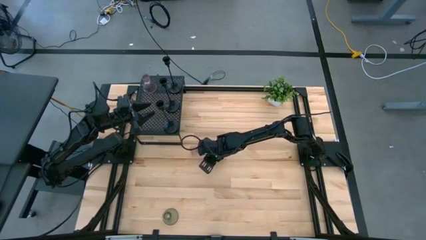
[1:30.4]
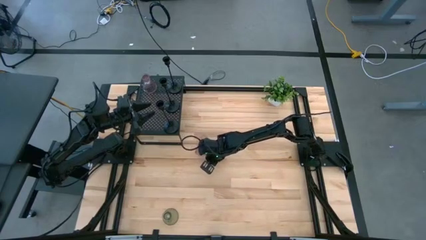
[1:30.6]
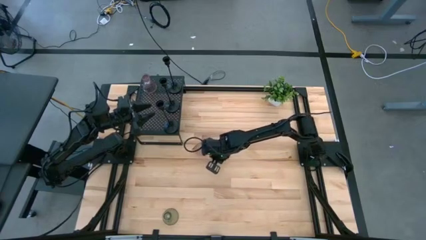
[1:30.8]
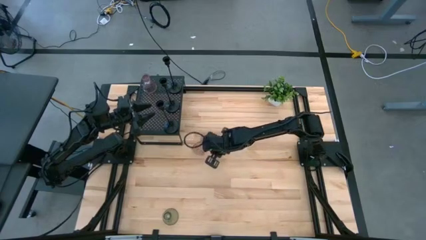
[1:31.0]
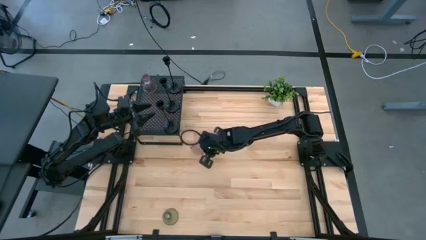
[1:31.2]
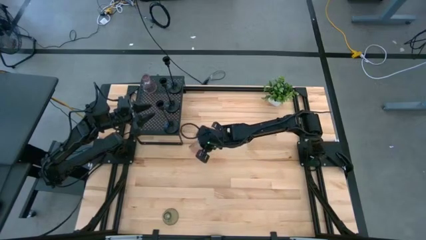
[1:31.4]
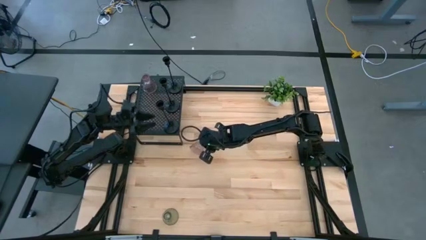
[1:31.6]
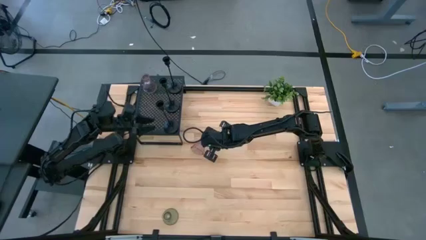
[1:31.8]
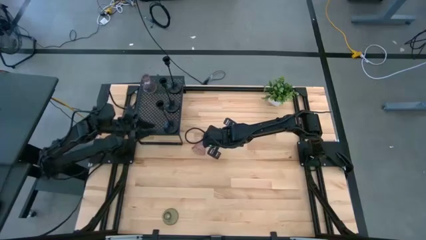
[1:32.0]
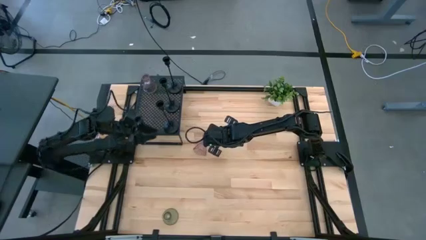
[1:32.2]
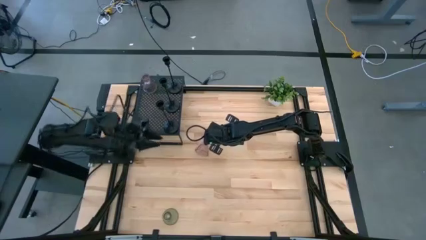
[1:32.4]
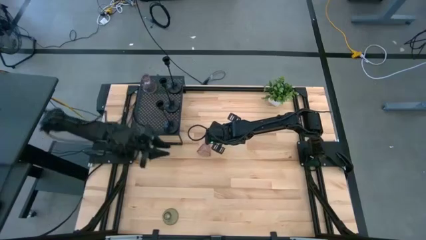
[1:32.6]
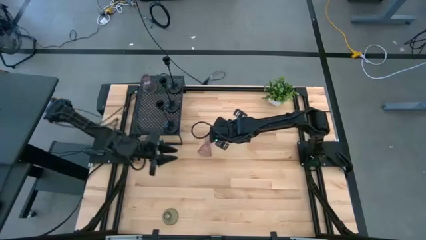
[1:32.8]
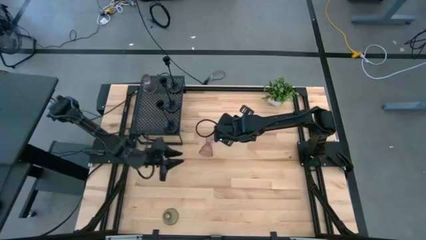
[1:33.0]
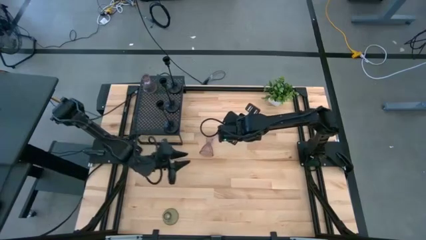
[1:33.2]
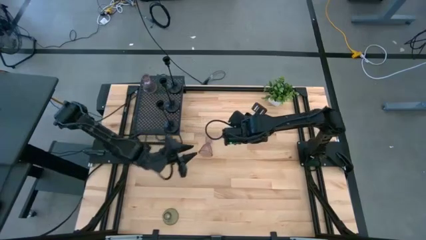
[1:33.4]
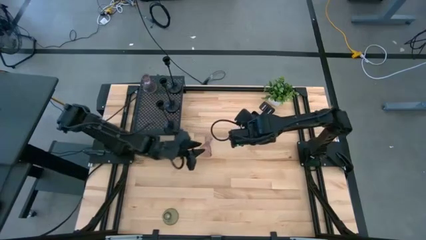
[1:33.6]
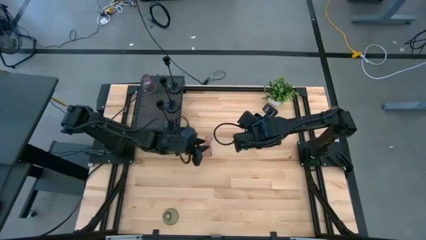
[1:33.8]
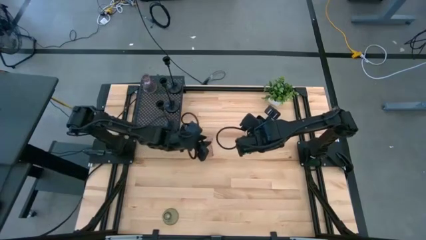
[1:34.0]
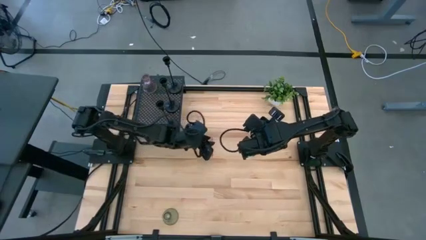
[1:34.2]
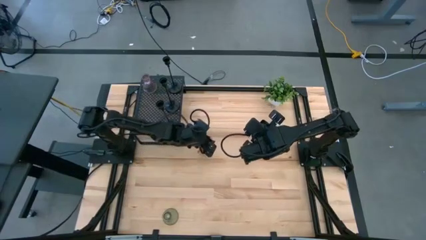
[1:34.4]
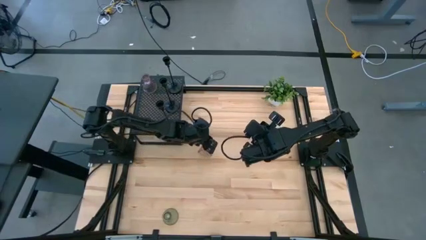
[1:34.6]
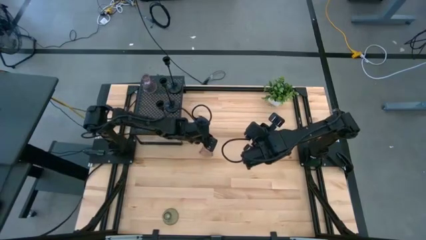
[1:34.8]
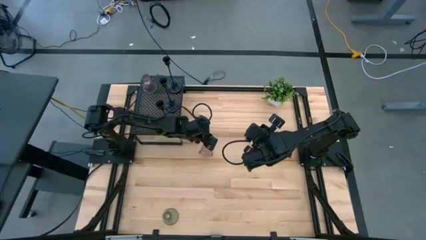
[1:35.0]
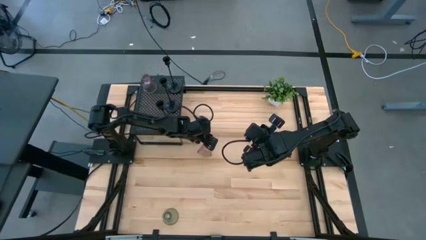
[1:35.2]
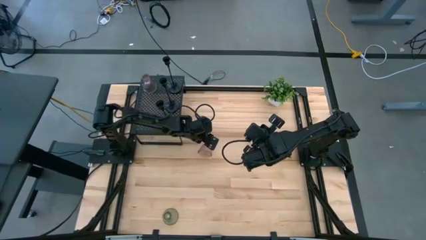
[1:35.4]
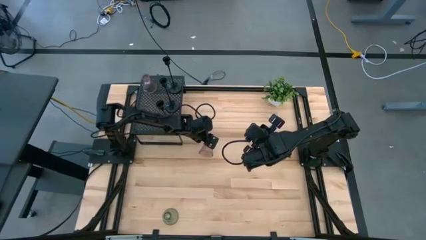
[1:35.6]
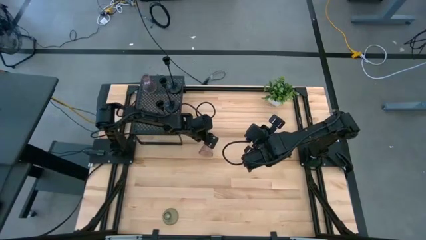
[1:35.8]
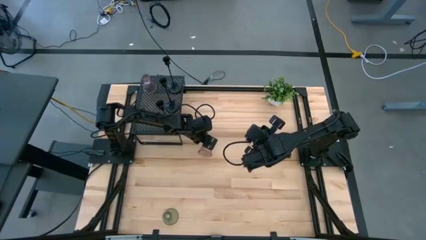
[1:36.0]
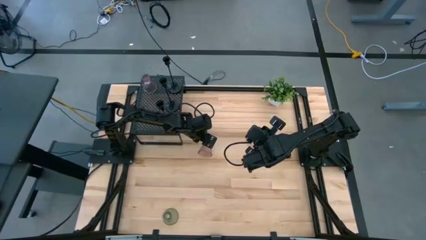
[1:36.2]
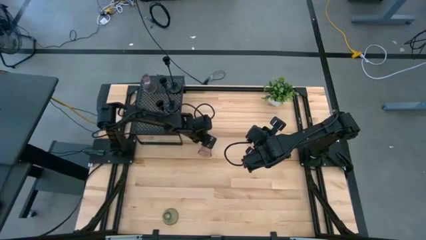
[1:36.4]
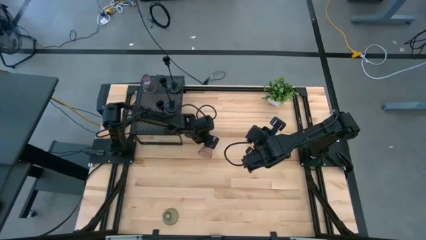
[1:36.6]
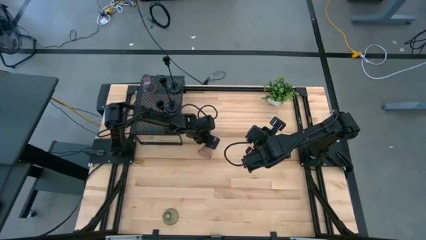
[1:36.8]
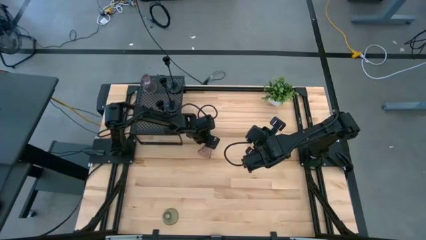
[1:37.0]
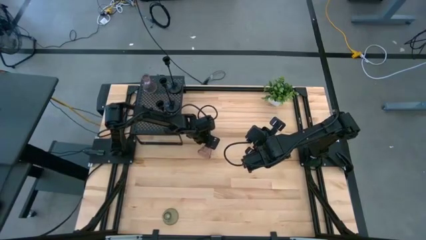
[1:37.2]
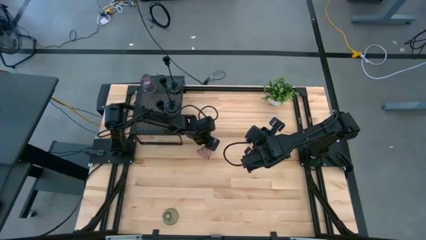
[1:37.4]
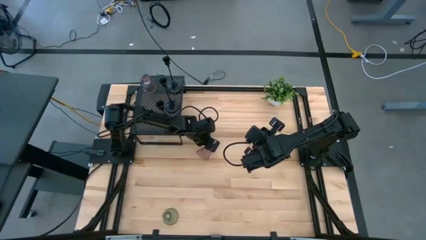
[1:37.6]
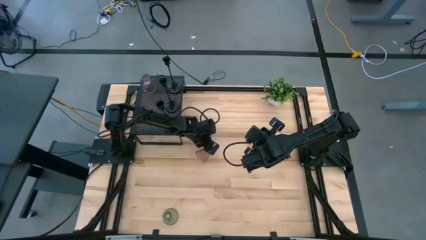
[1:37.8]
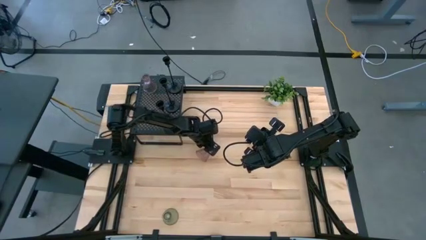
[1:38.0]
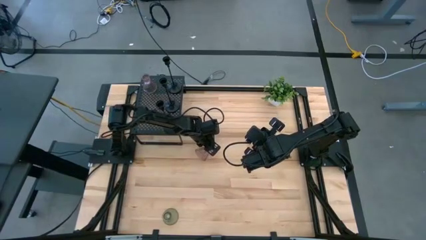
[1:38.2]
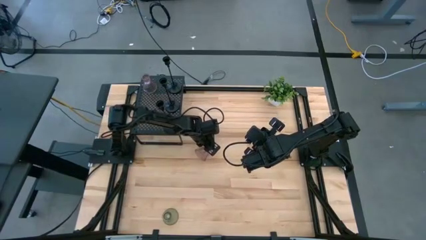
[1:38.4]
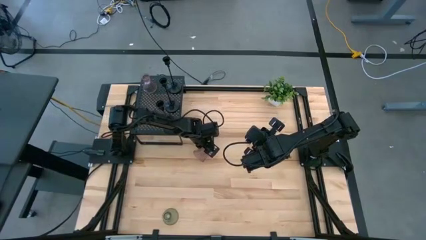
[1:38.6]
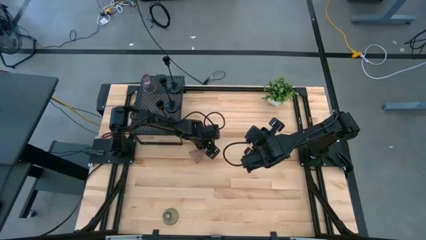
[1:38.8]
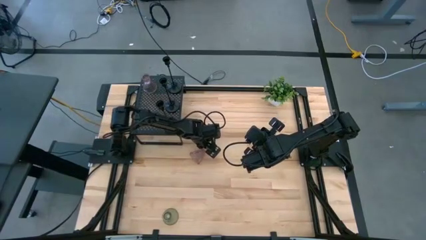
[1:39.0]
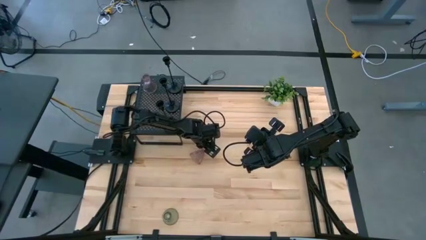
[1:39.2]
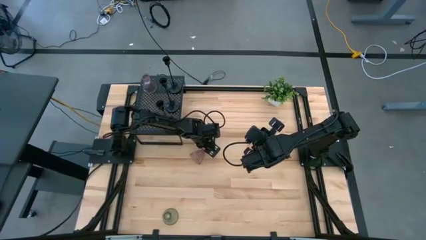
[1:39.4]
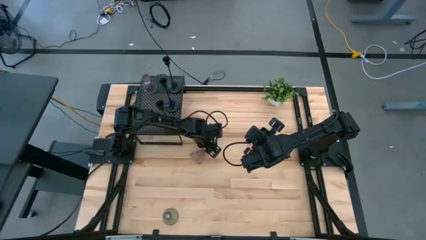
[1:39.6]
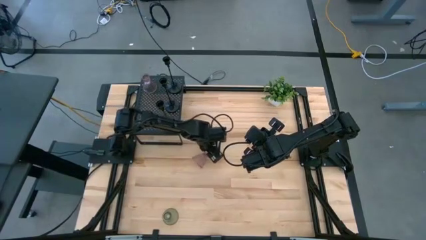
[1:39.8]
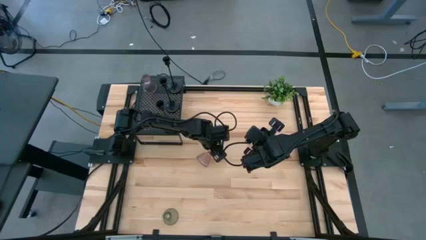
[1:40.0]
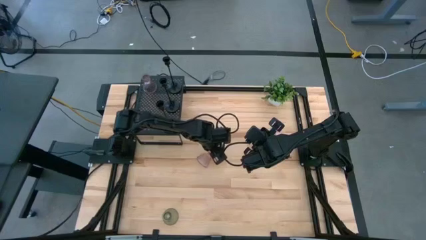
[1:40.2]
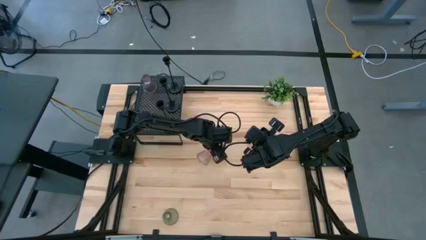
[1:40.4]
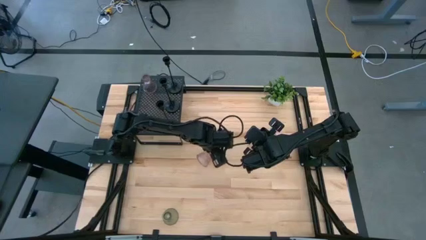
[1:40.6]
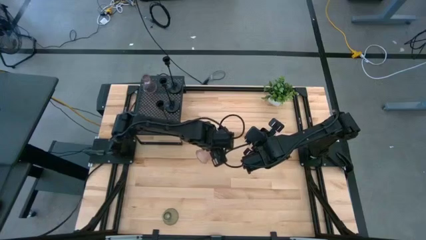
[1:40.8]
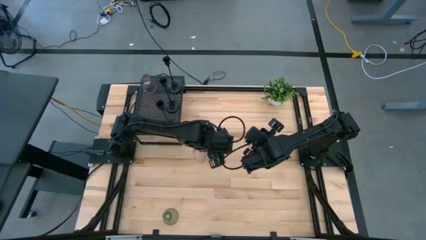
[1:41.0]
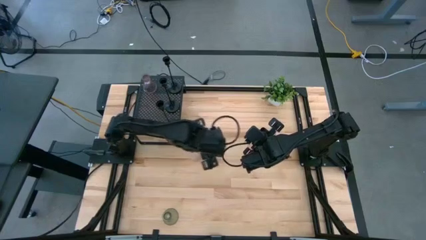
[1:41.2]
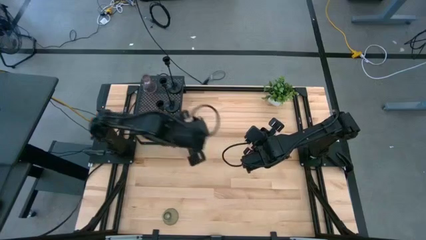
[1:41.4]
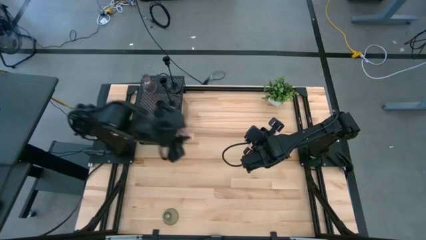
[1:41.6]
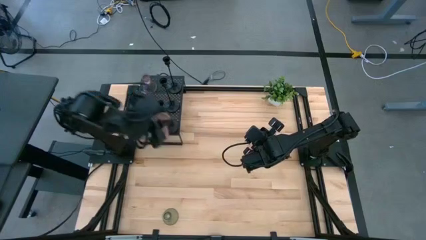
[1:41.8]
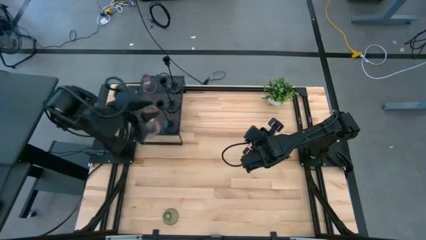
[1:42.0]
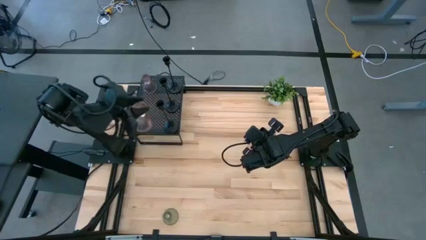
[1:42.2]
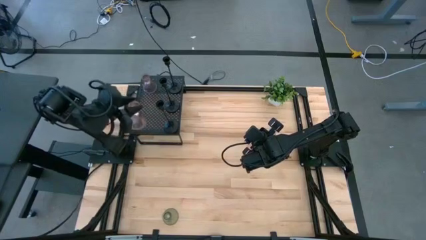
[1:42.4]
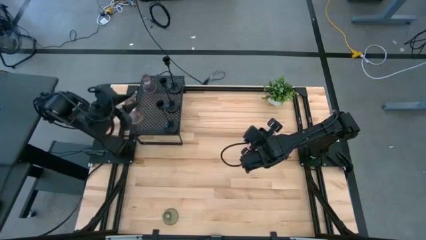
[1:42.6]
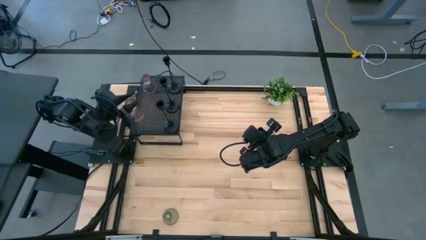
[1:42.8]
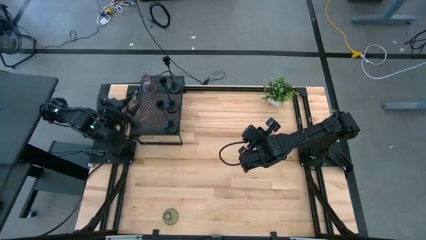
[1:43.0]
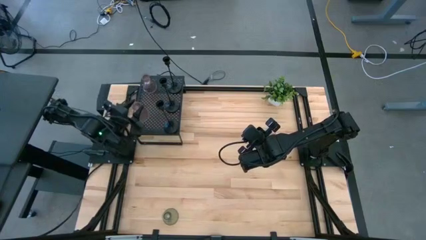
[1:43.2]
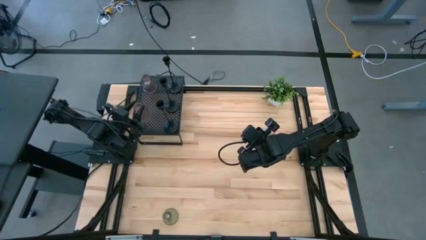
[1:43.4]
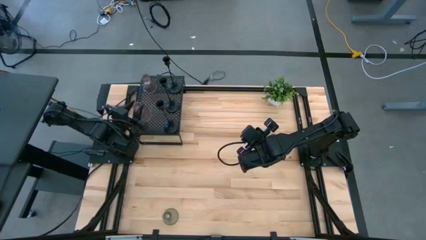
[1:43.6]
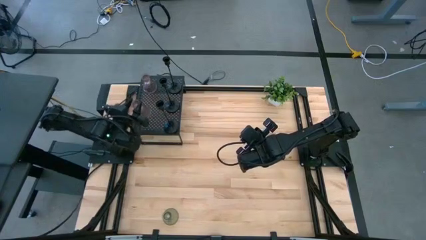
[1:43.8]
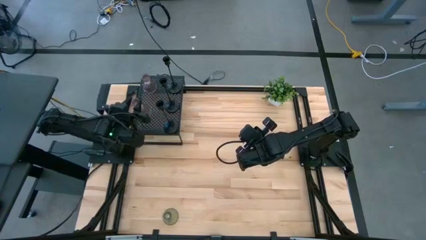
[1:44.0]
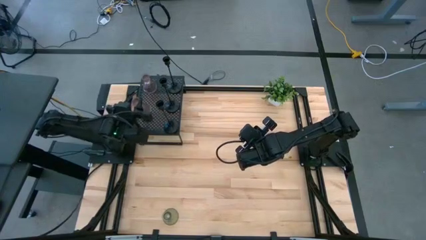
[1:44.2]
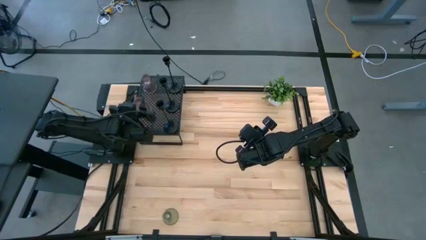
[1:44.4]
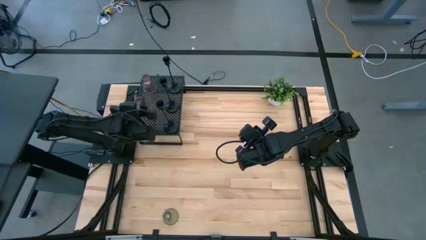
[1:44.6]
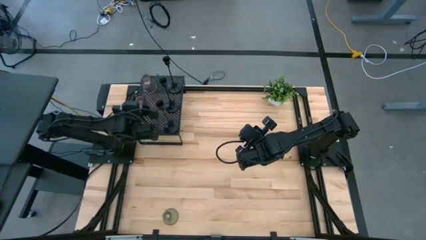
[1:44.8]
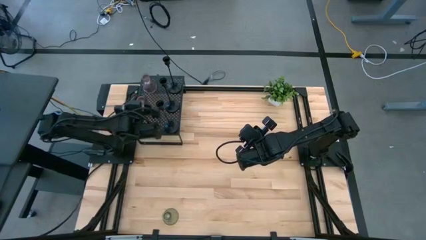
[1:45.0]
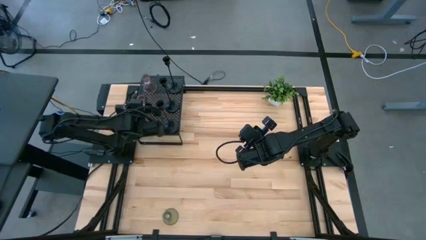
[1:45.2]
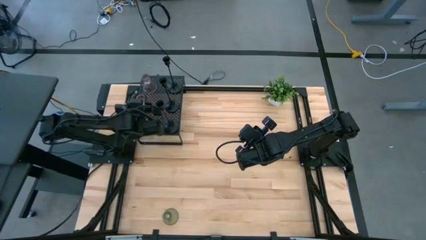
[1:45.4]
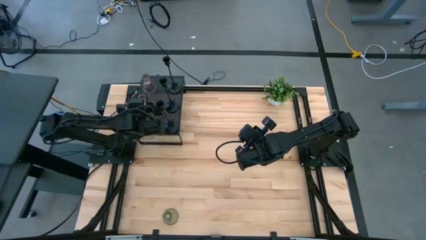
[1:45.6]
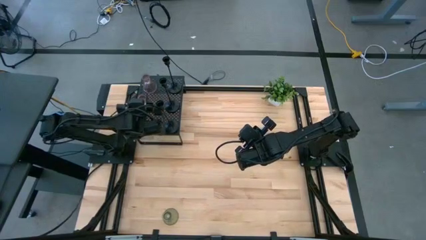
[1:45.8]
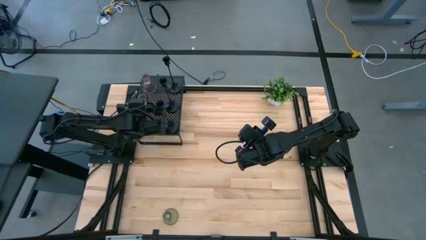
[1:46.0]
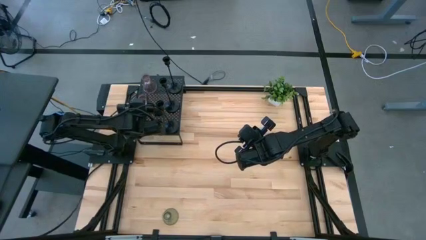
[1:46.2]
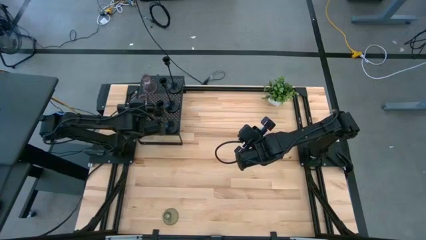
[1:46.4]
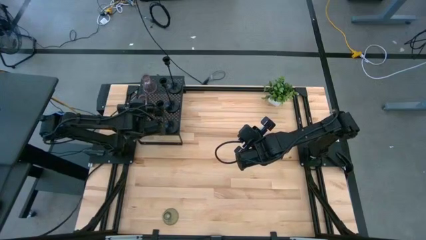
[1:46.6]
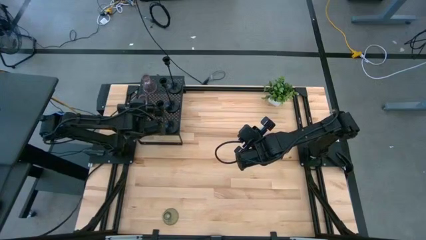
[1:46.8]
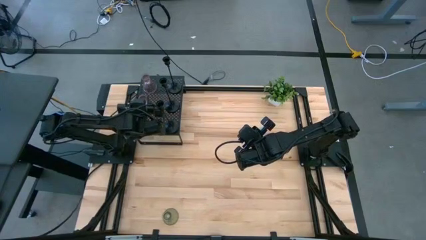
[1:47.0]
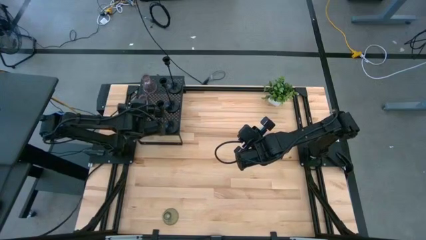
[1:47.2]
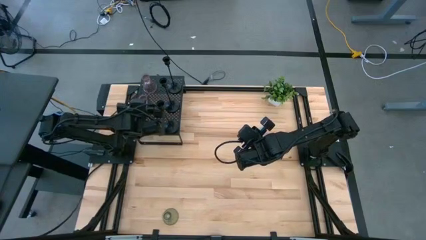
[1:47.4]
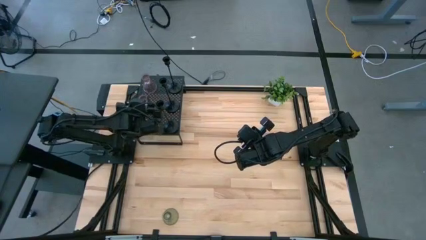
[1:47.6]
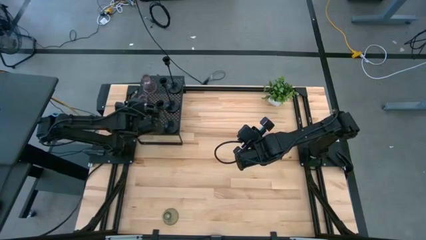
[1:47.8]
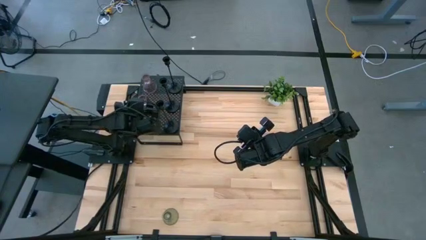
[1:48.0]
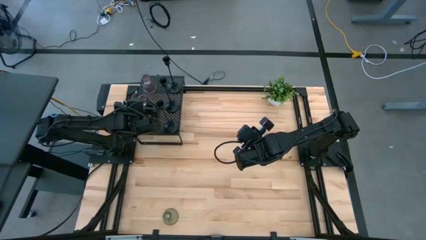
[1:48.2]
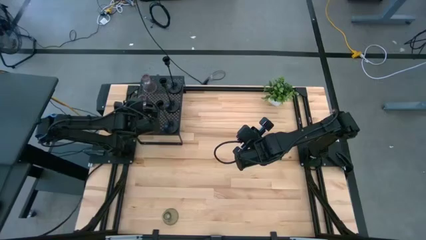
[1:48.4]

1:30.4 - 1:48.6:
Task: Pick & Place candle stick holders
Align the pink candle holder with the other pink candle holder on the shelf
